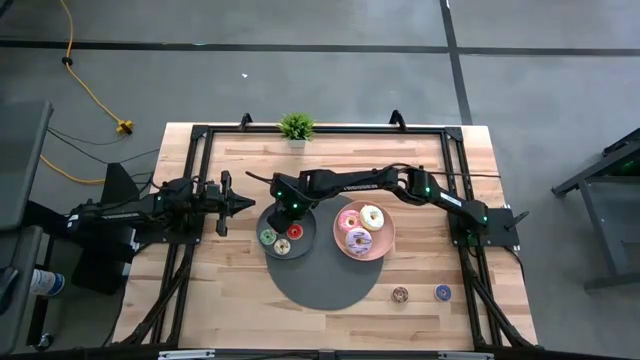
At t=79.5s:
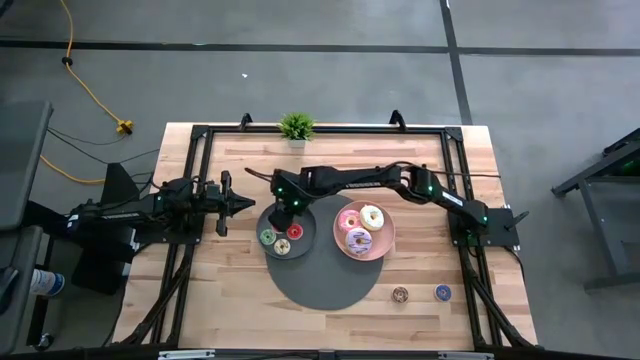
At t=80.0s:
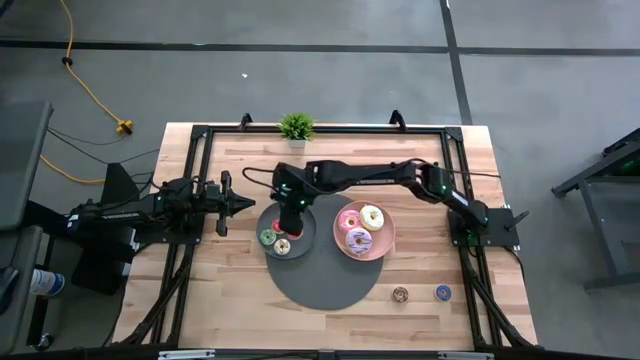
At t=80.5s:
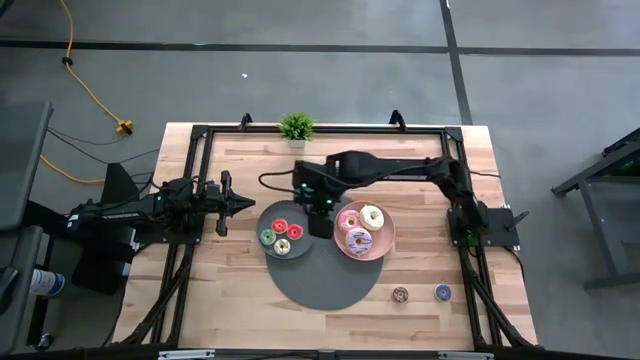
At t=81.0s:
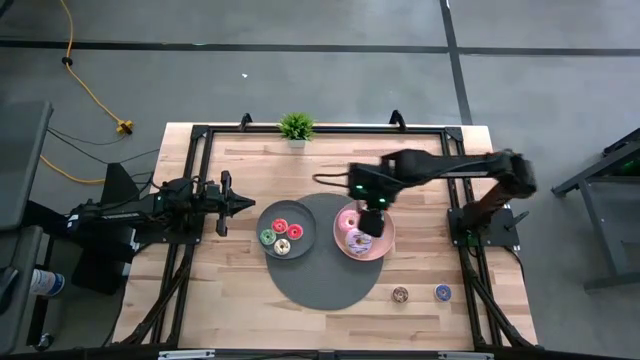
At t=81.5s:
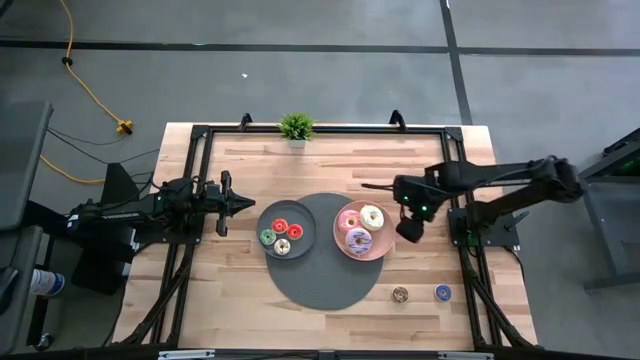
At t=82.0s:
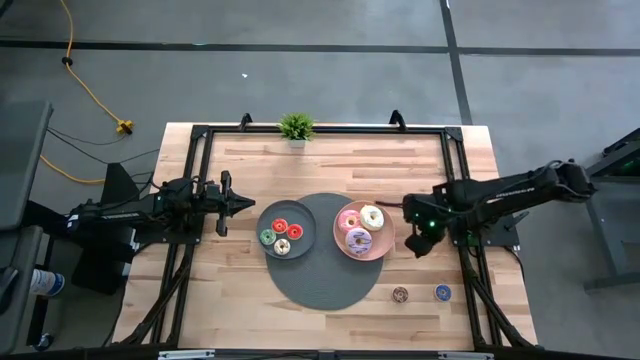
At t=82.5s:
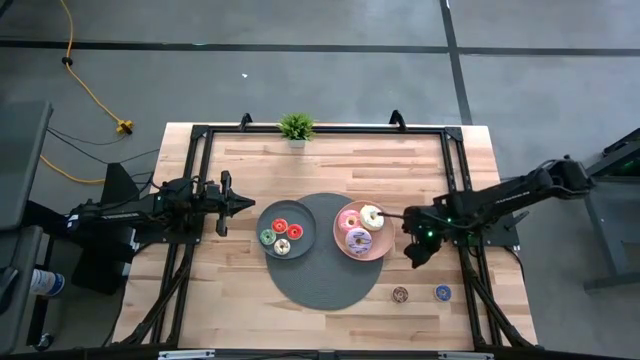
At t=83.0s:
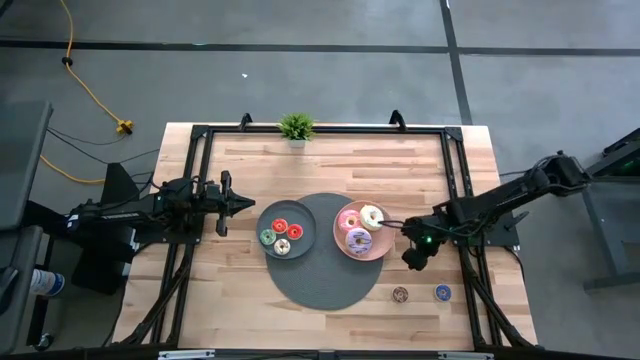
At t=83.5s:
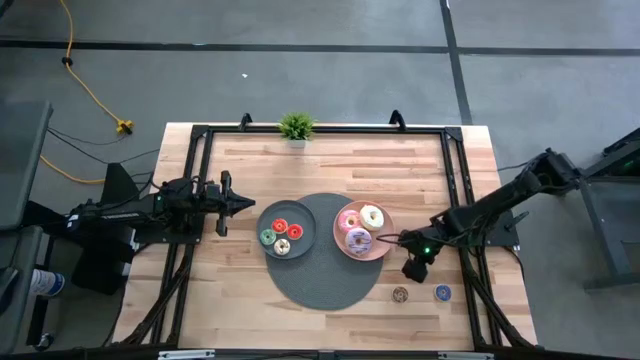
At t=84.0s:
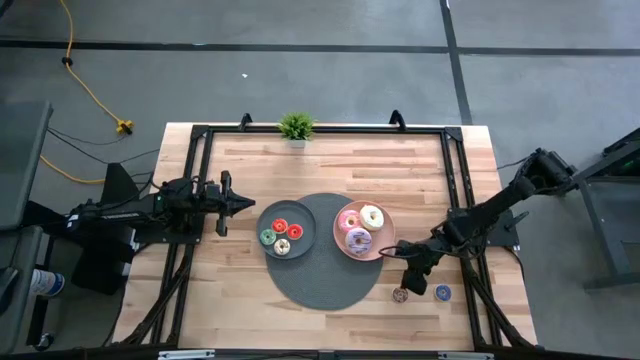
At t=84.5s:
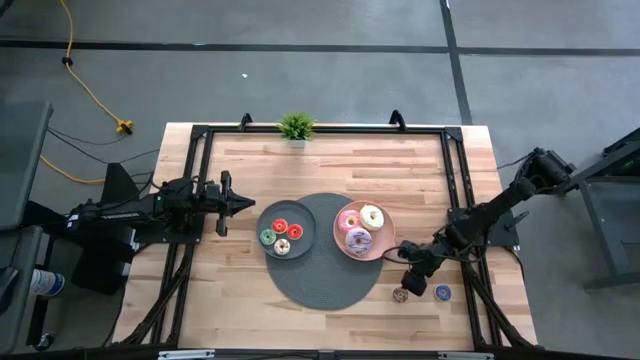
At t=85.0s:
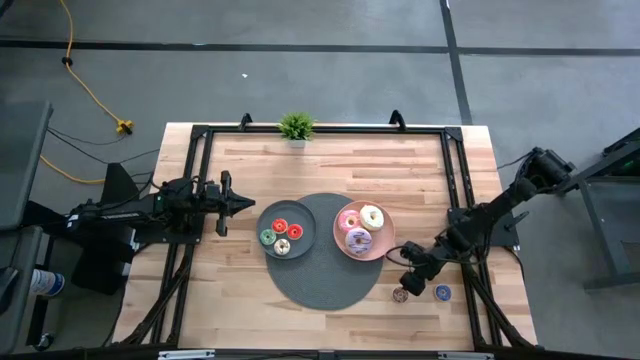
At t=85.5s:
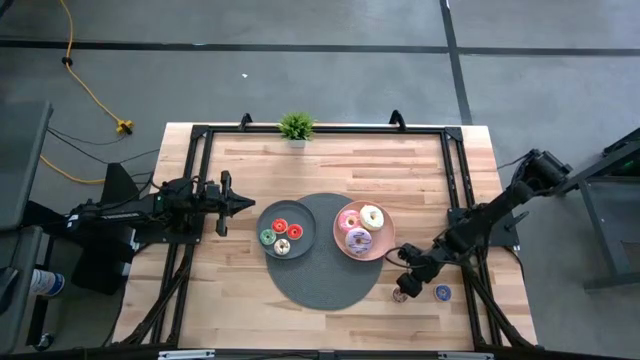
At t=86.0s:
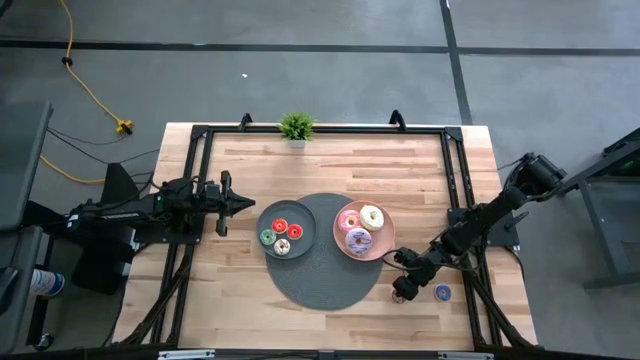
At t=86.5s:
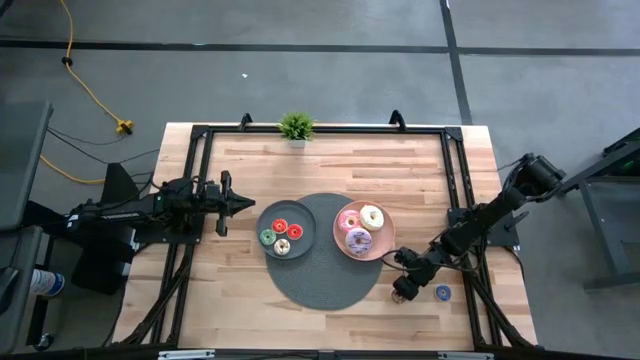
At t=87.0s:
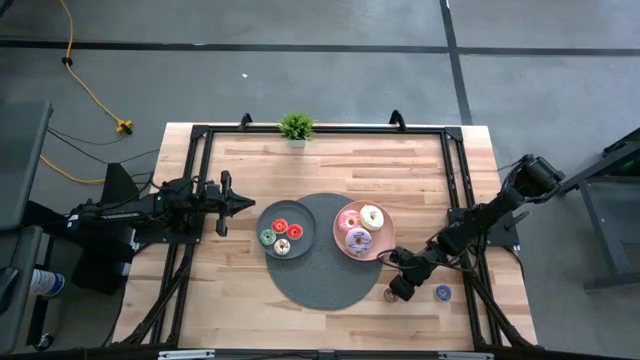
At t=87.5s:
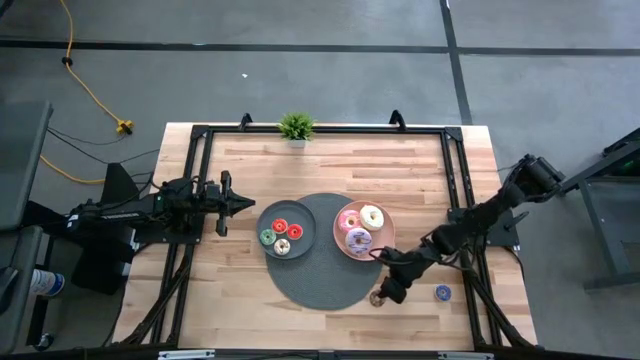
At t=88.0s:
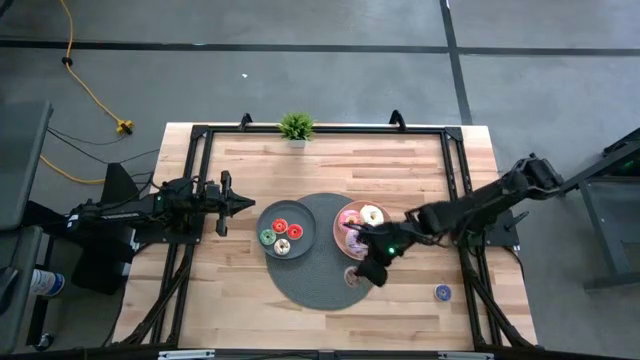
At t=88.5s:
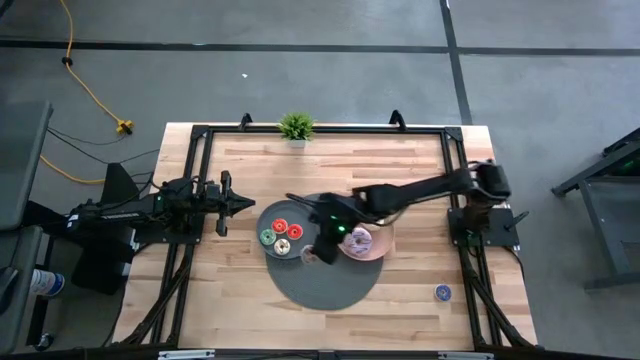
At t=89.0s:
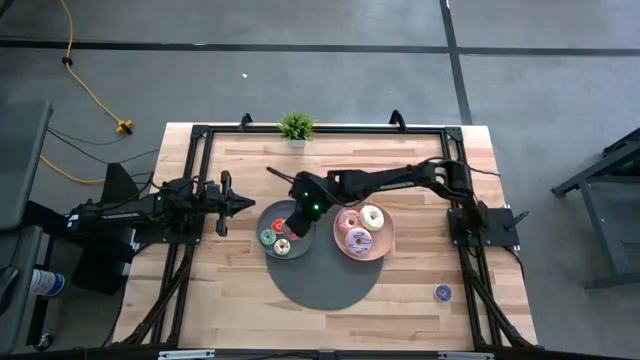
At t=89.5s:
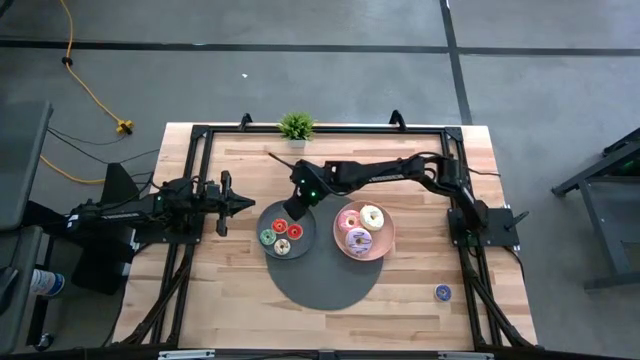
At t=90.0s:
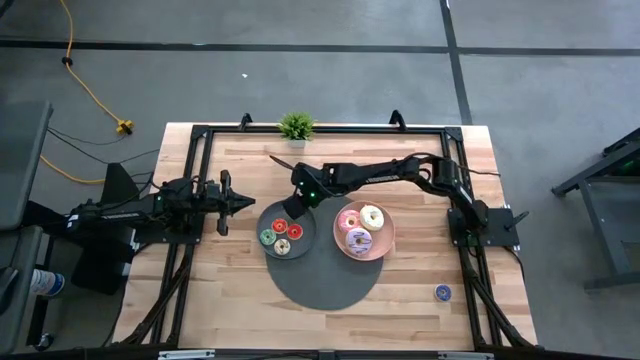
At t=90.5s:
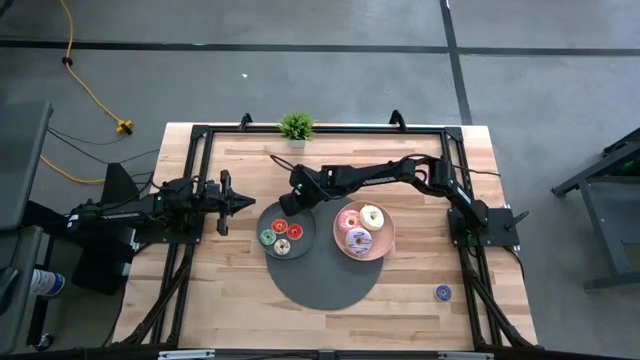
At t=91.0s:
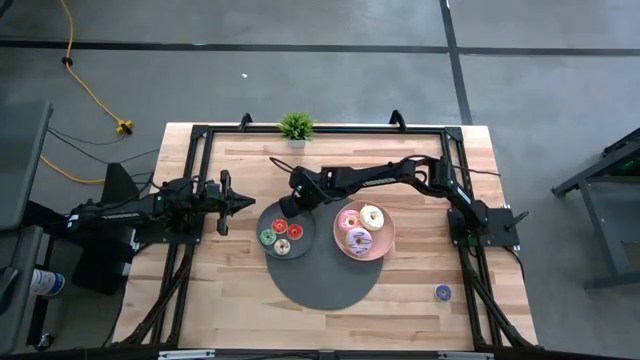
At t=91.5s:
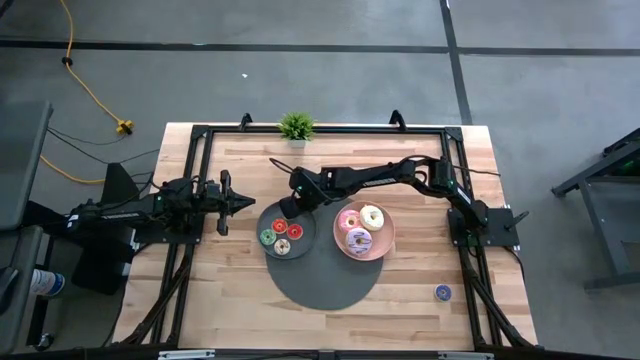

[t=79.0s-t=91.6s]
Task: Pick & Place donuts
Put the small brown donut on the gray plate

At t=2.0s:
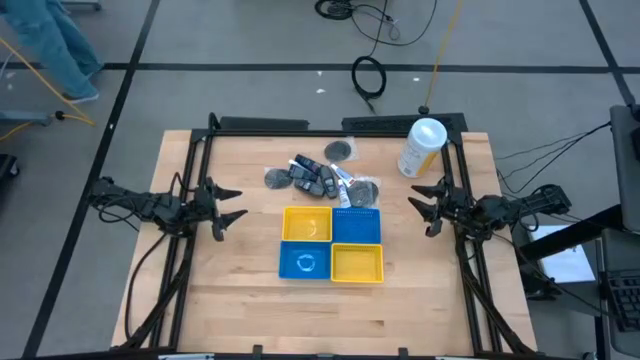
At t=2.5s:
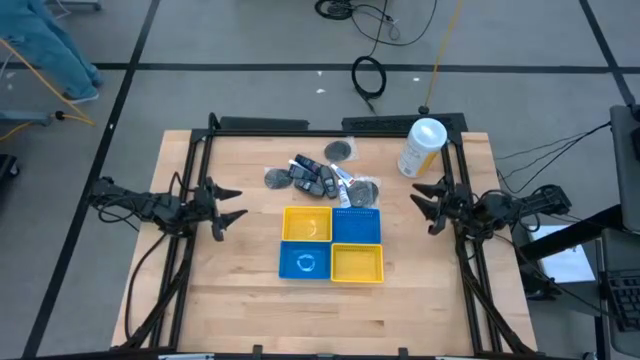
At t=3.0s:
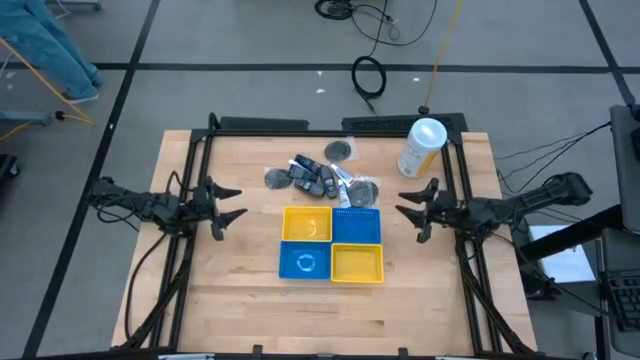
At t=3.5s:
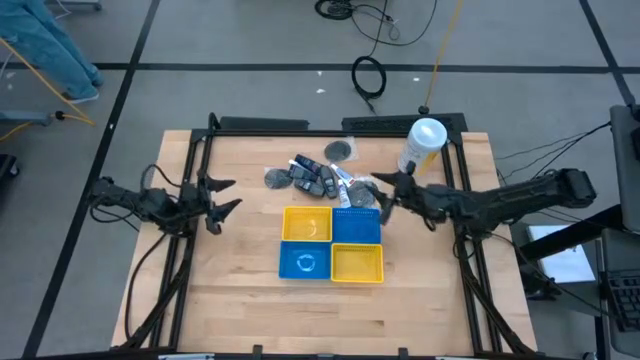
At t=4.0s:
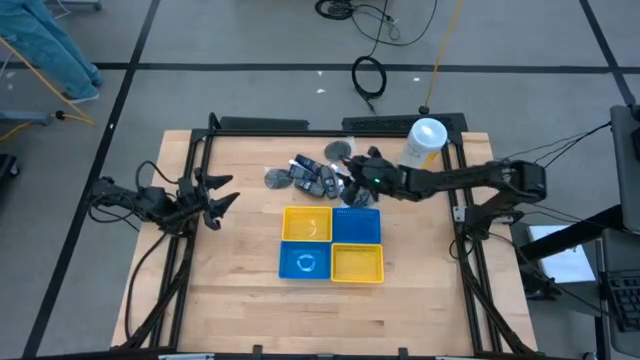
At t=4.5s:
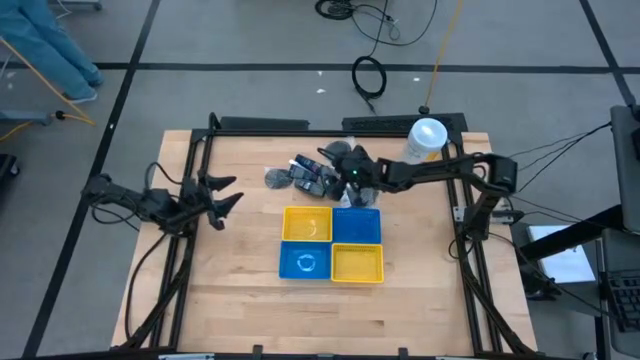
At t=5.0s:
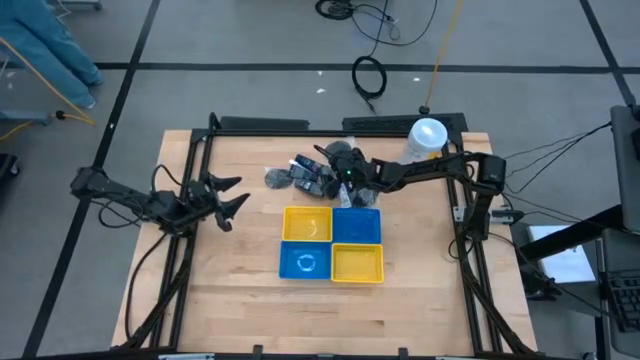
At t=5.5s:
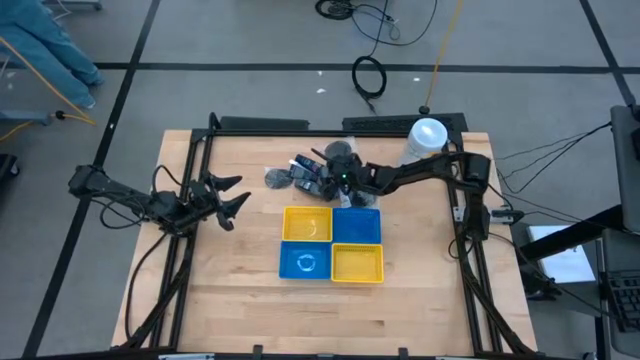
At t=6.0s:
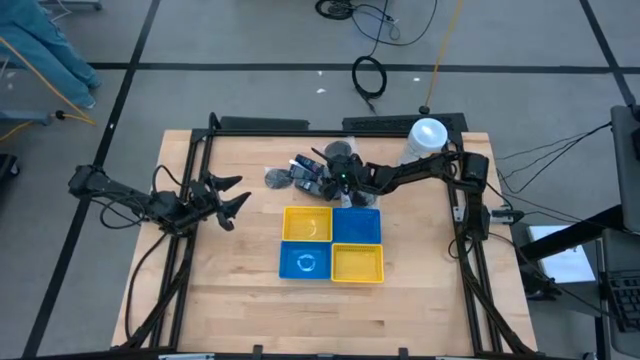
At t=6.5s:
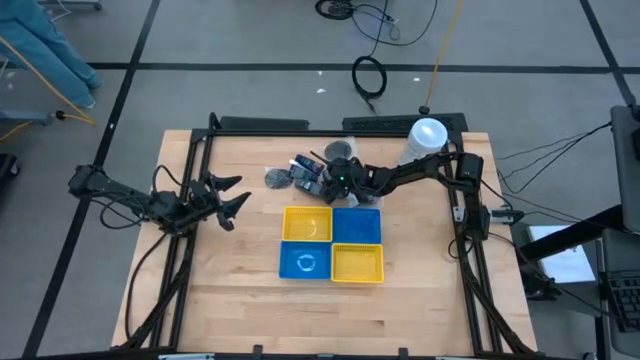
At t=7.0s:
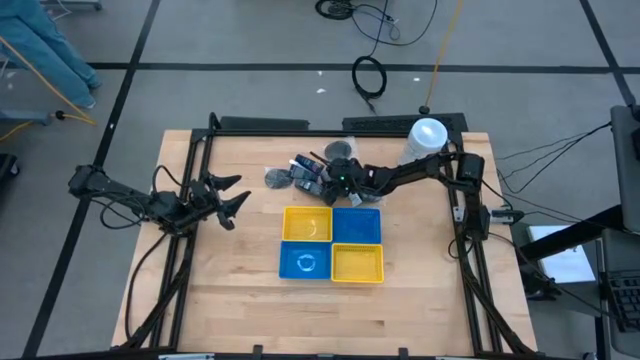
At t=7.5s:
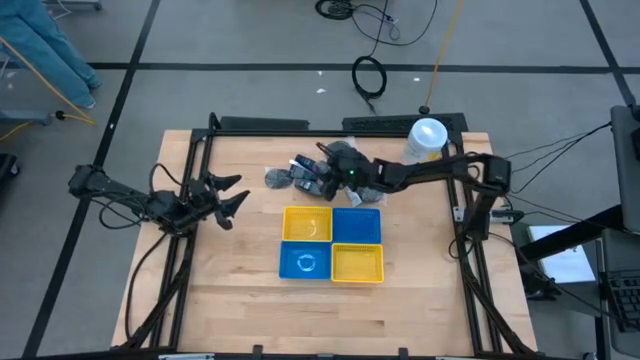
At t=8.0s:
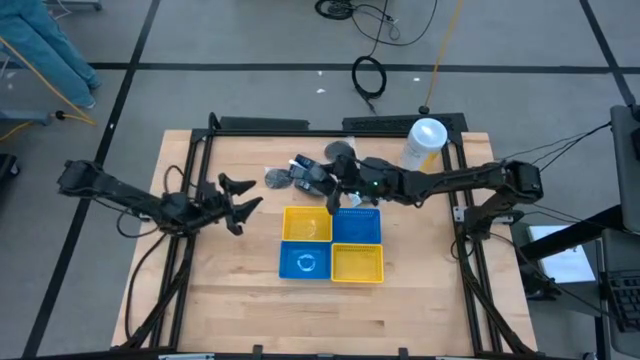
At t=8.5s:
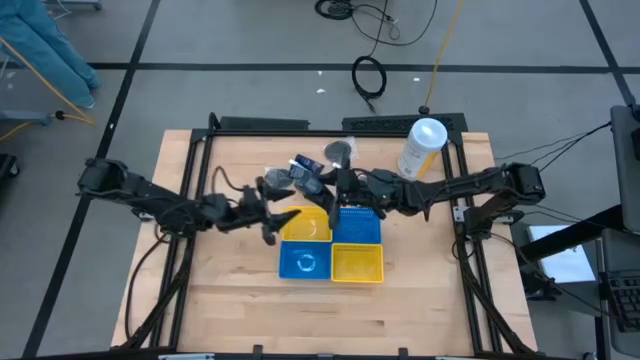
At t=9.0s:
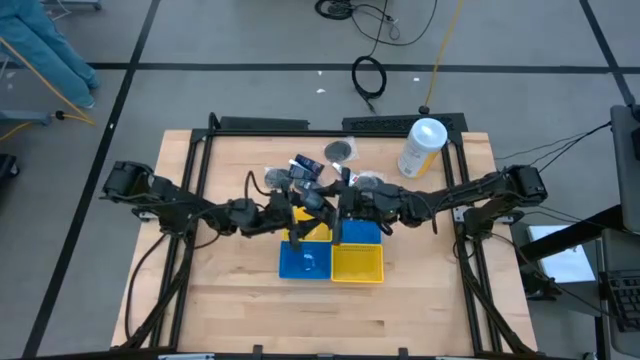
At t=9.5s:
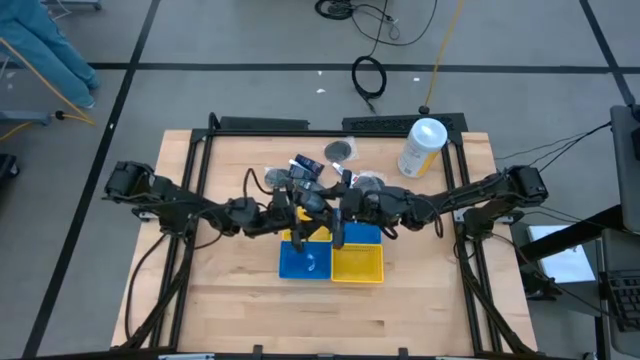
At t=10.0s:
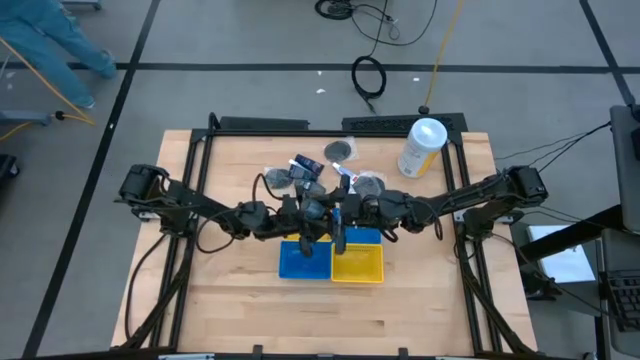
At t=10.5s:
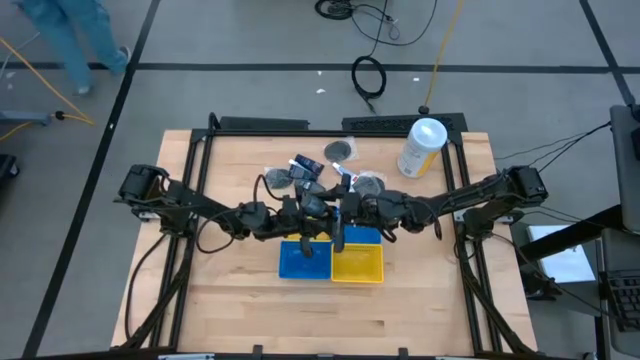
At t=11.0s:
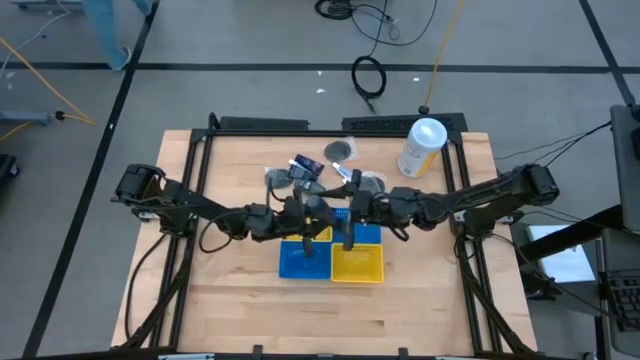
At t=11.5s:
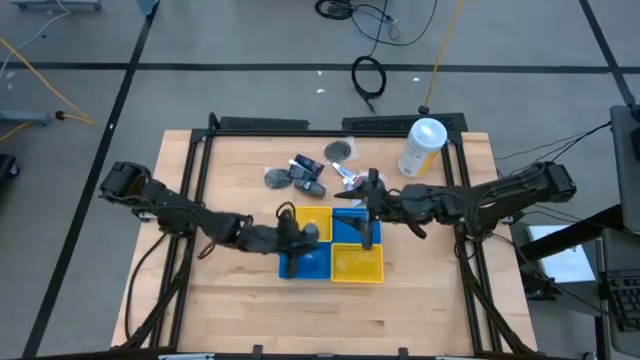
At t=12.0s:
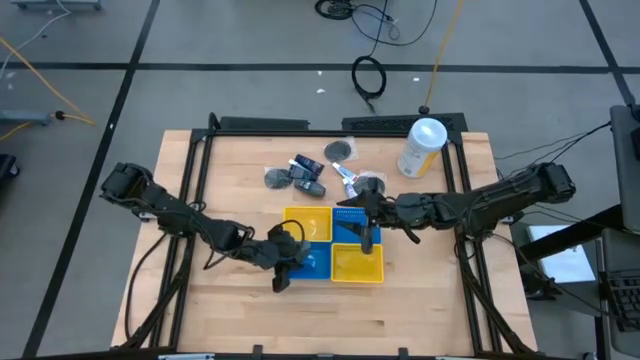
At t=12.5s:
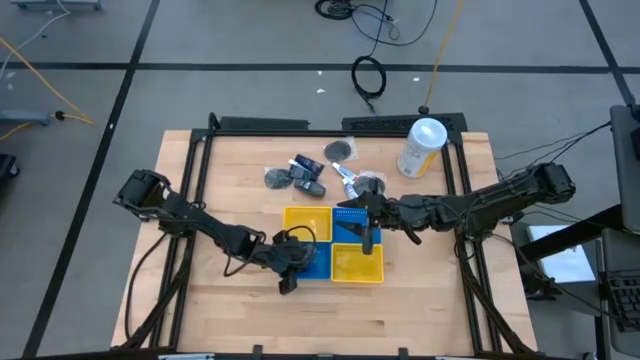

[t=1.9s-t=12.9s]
Task: Pick & Place Travel size toiletries
Put the black deodorant into the bottom blue basket
